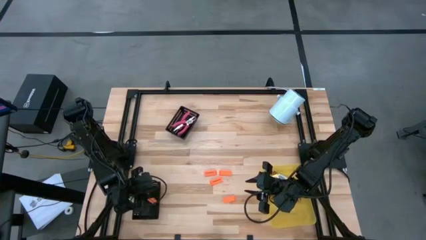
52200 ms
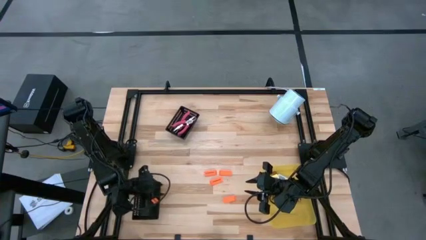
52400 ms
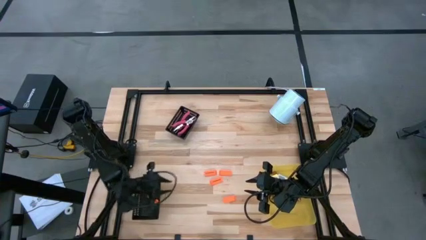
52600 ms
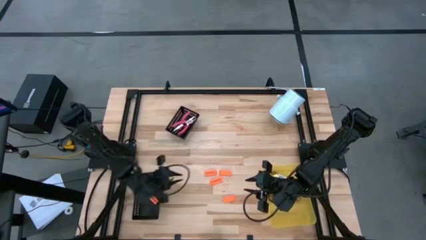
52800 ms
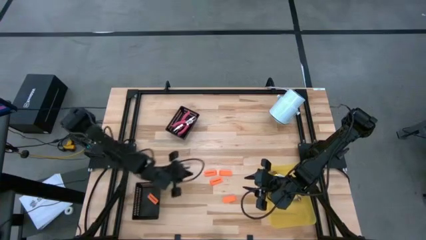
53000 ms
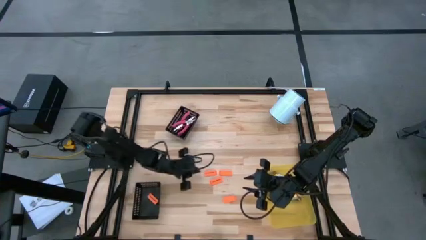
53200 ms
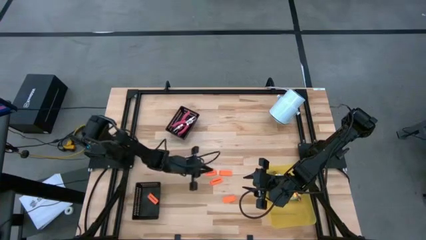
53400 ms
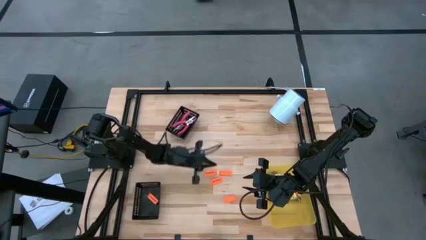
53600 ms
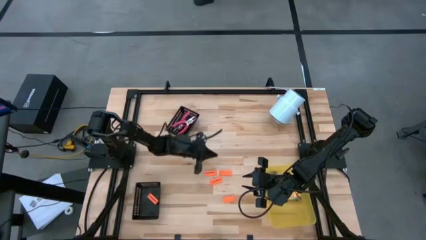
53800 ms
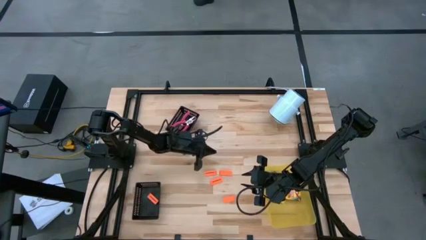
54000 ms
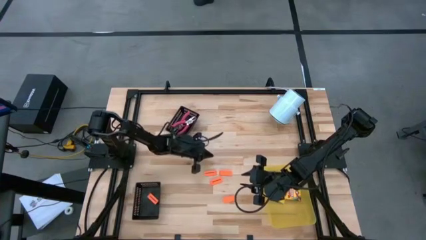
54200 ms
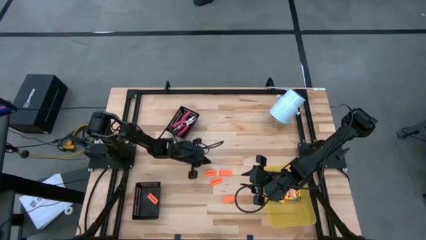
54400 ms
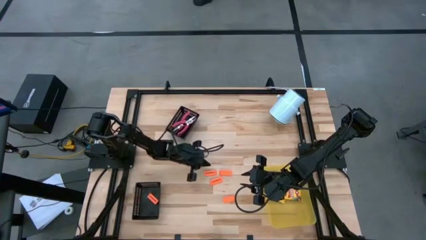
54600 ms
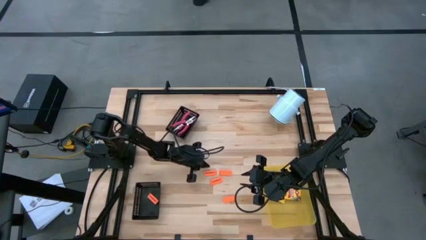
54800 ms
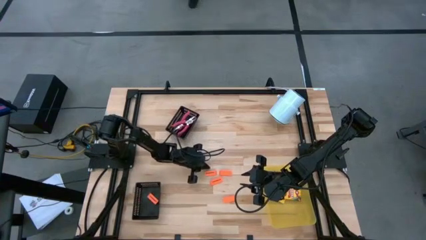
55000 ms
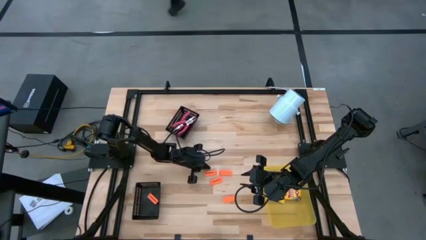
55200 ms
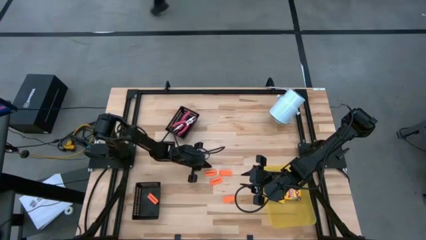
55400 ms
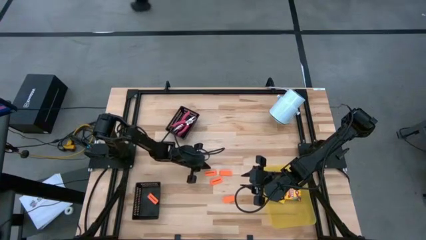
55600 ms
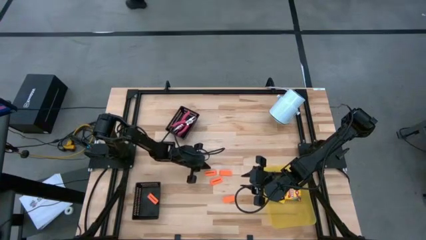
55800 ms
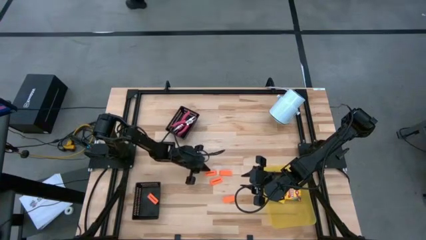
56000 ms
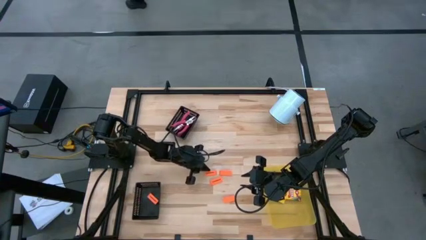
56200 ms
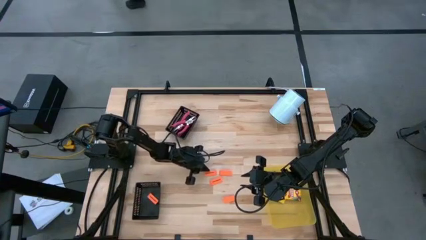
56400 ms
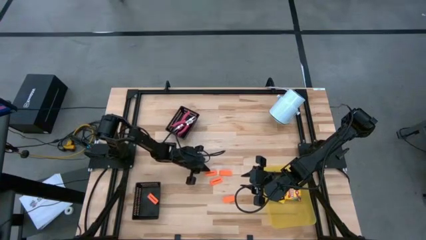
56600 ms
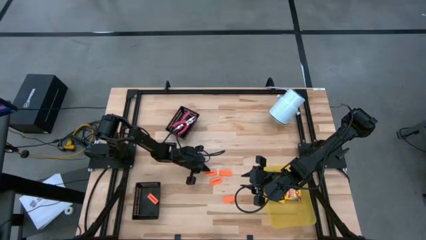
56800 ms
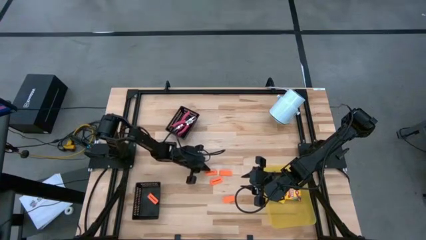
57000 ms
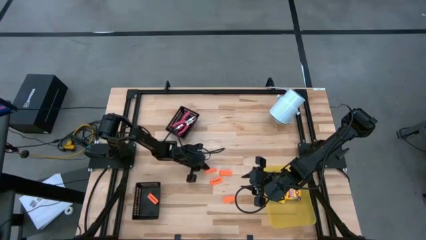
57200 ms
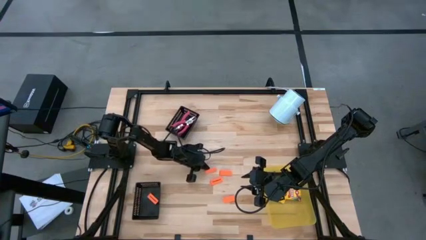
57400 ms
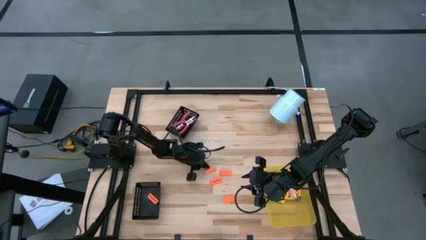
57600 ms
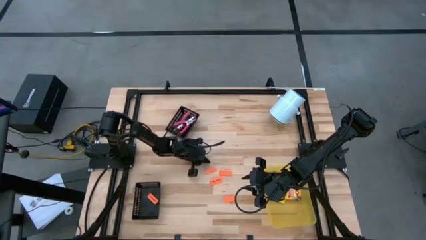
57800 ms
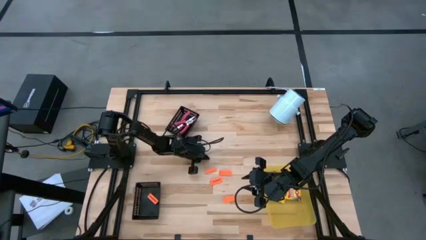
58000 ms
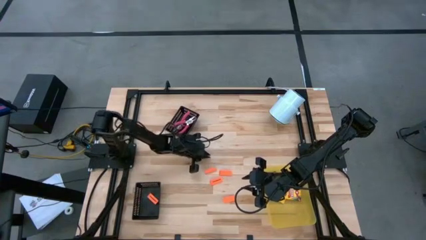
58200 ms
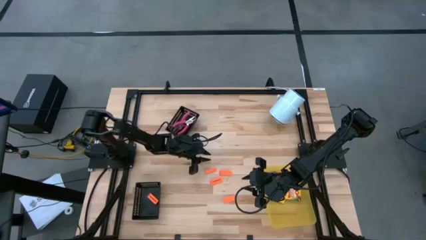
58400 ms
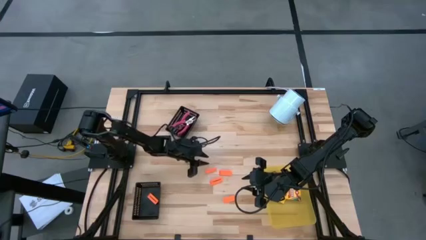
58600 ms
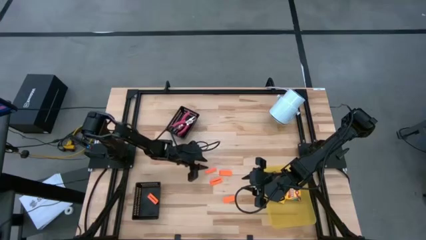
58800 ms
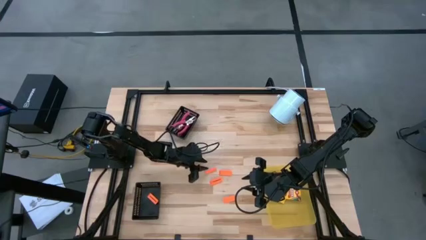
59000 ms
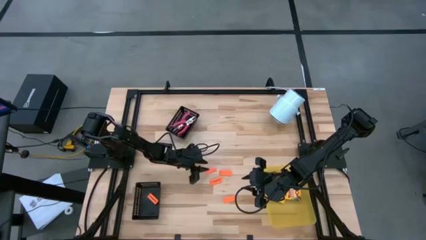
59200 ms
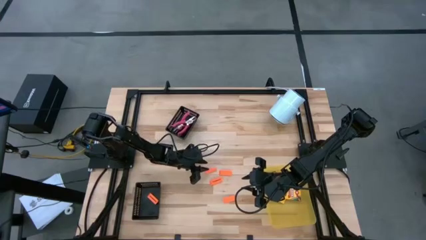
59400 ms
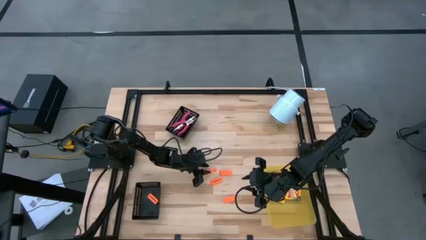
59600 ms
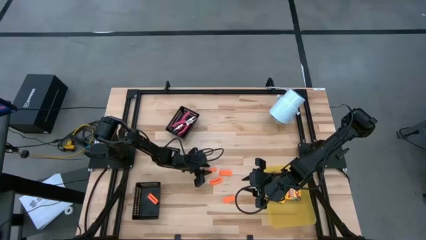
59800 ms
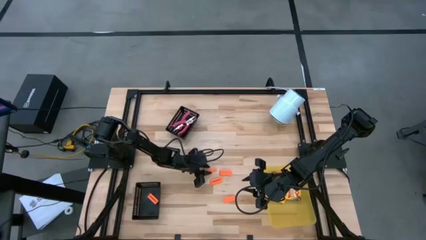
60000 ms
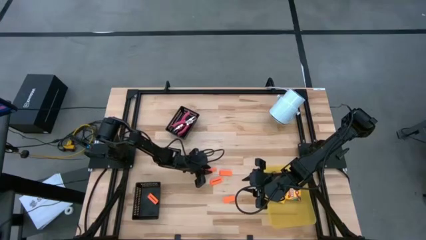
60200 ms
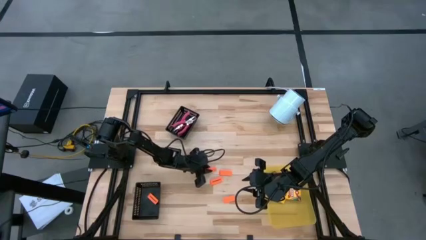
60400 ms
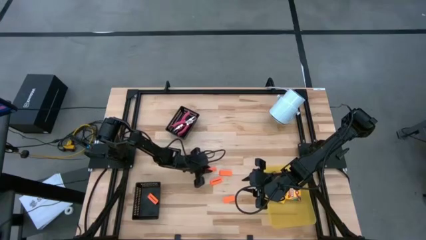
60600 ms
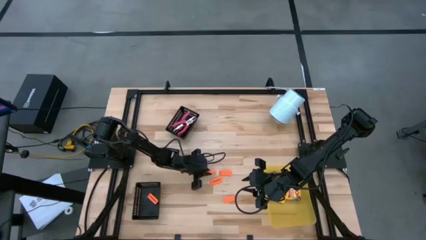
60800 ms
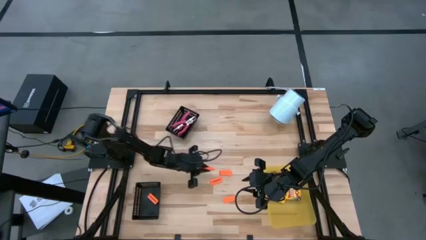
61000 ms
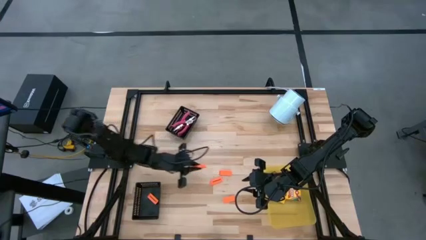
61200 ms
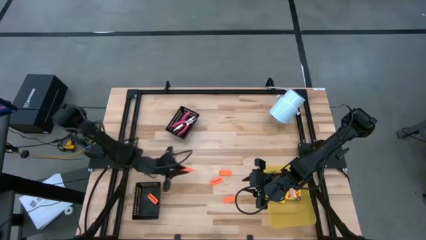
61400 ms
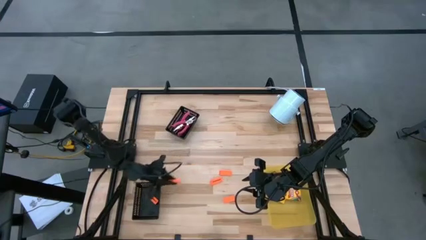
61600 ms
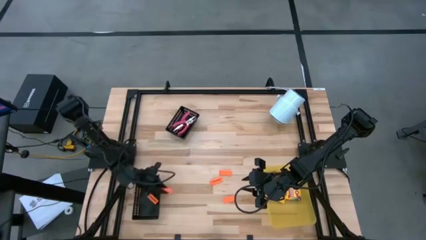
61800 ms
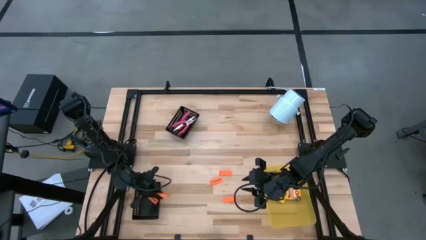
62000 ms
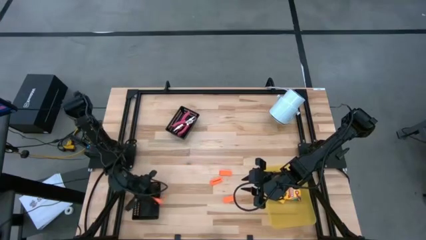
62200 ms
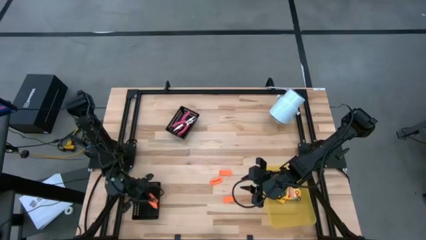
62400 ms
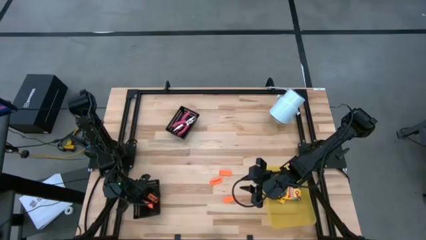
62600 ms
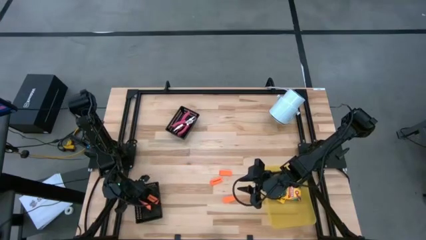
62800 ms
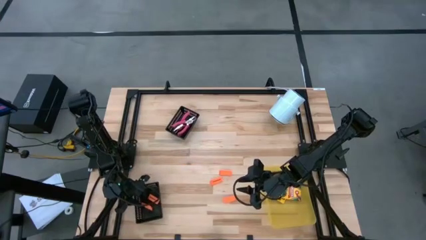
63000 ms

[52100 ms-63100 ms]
Task: Pick & Place School Supplies
Put the orange eraser into the bottom black basket

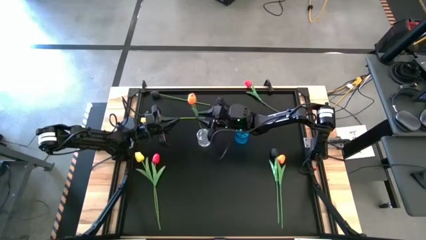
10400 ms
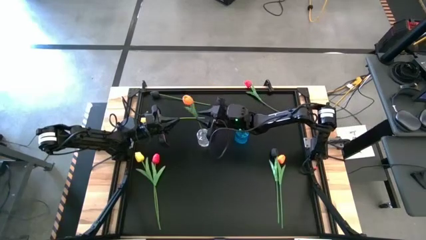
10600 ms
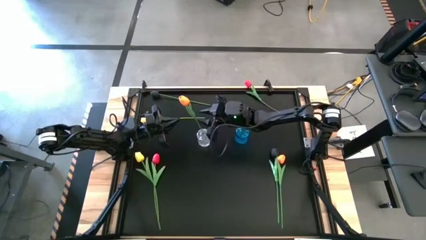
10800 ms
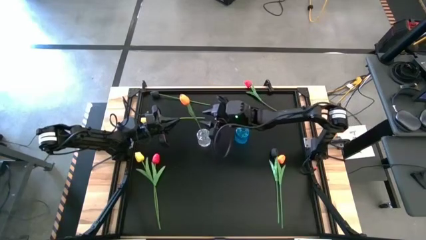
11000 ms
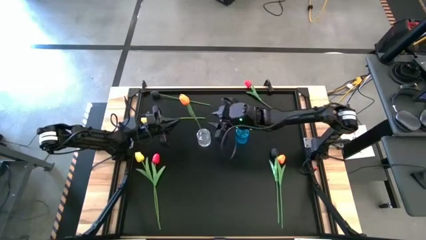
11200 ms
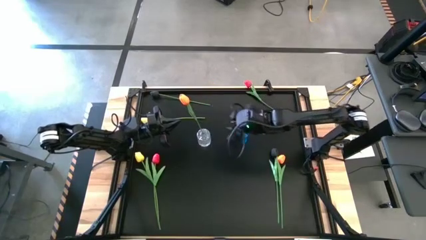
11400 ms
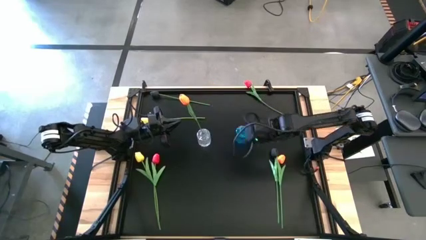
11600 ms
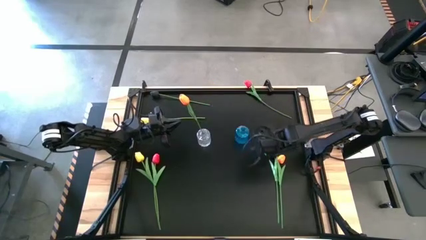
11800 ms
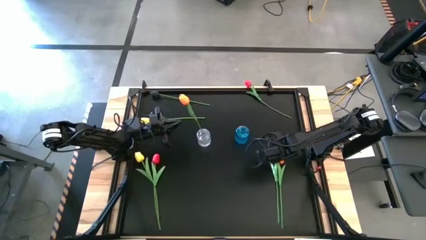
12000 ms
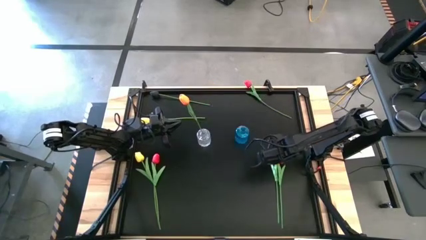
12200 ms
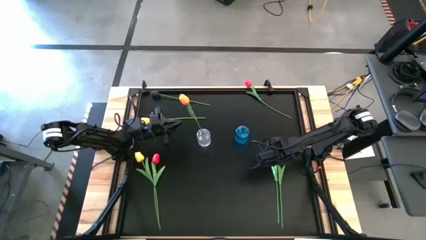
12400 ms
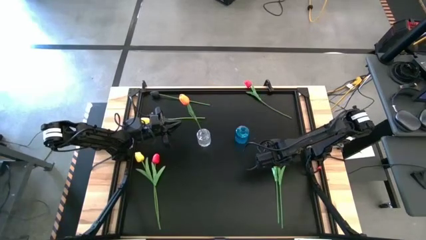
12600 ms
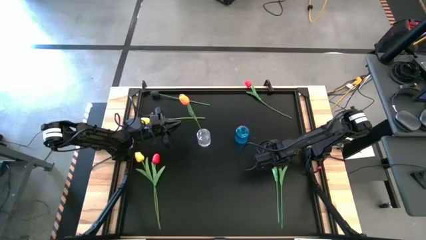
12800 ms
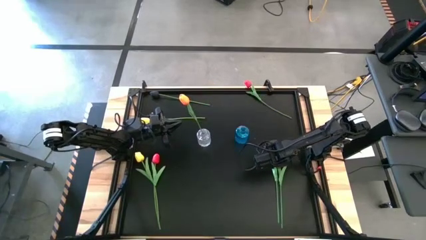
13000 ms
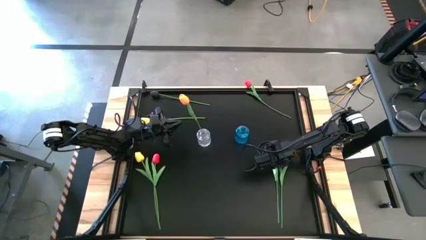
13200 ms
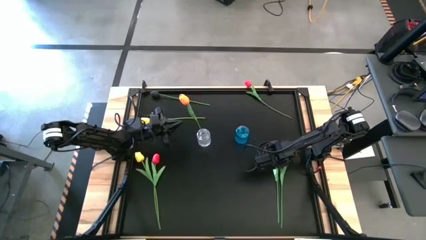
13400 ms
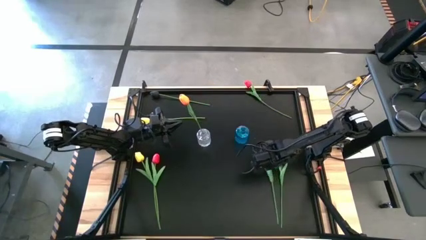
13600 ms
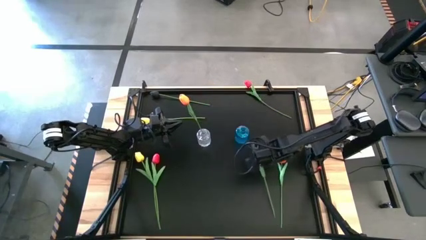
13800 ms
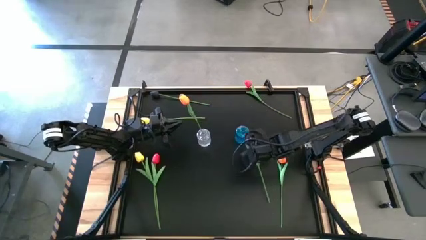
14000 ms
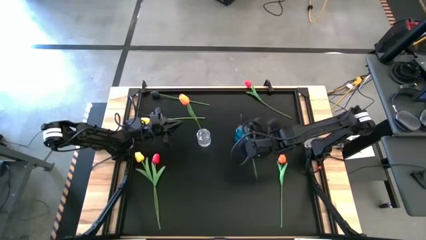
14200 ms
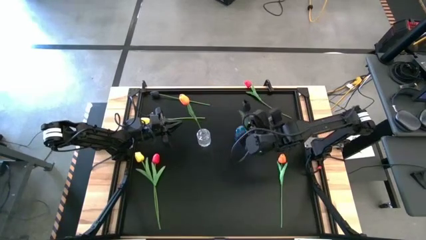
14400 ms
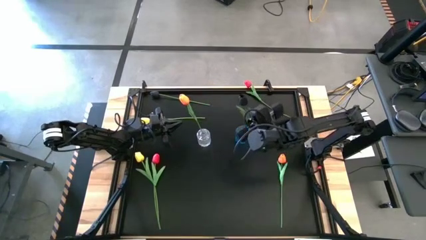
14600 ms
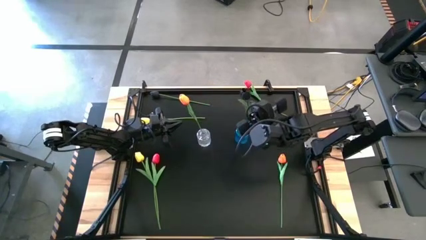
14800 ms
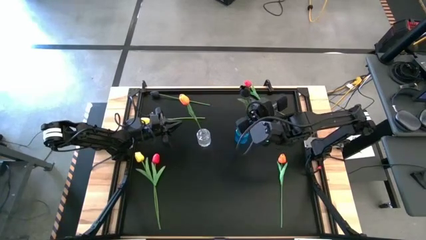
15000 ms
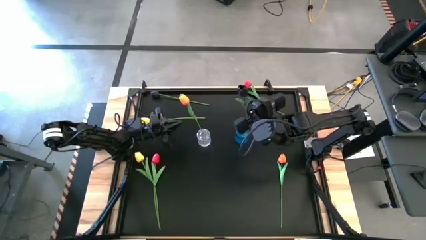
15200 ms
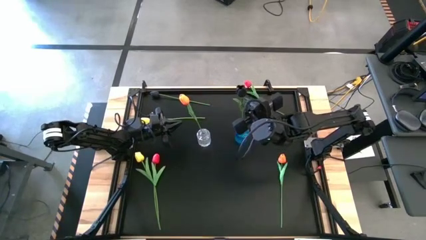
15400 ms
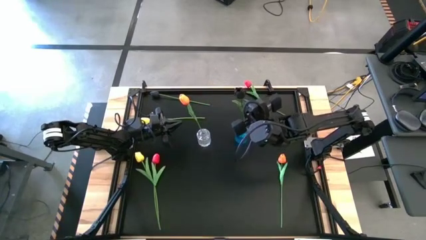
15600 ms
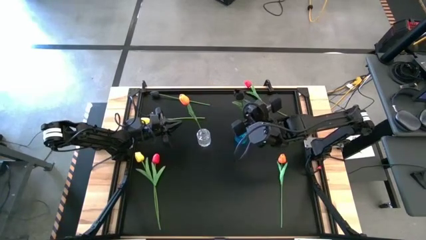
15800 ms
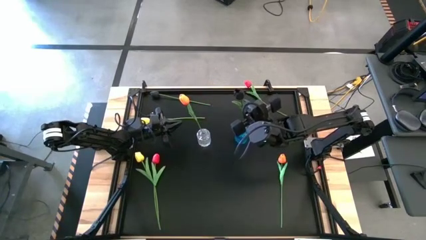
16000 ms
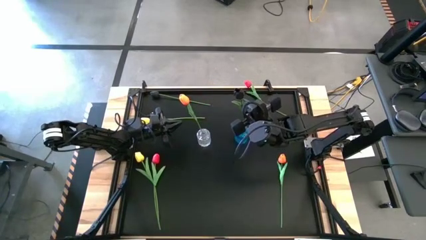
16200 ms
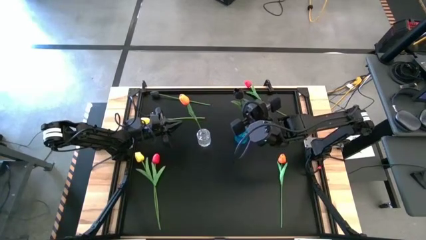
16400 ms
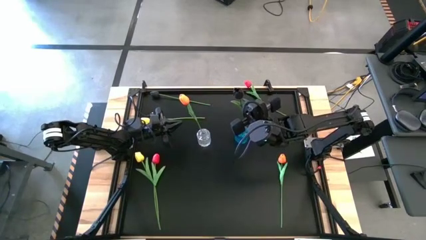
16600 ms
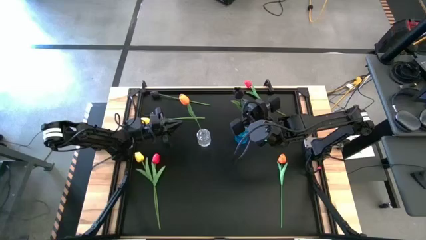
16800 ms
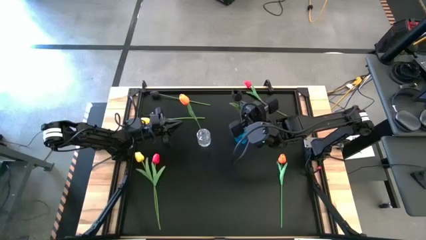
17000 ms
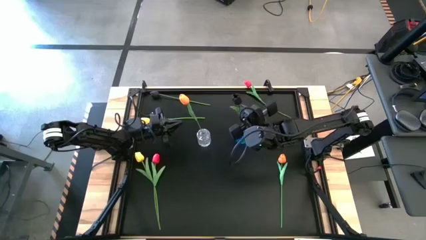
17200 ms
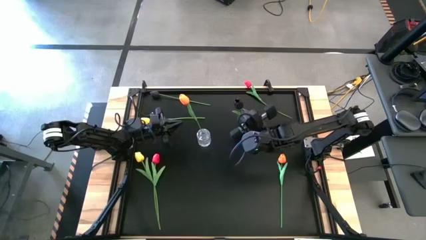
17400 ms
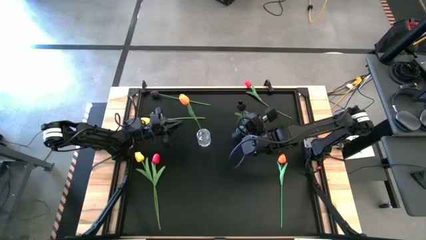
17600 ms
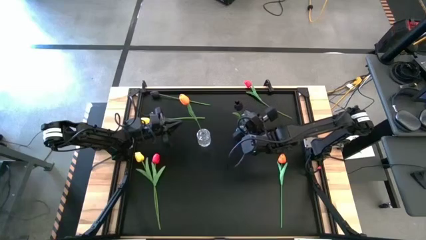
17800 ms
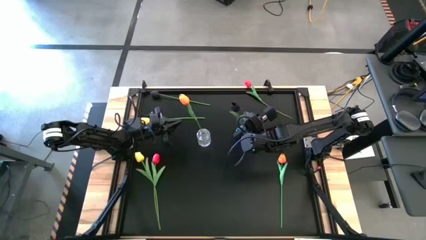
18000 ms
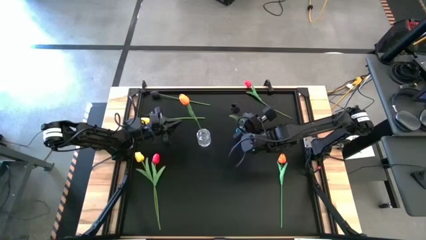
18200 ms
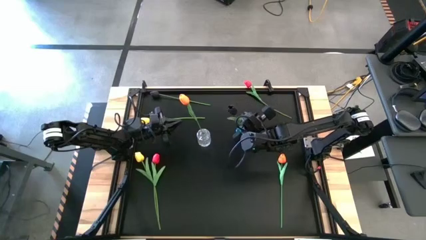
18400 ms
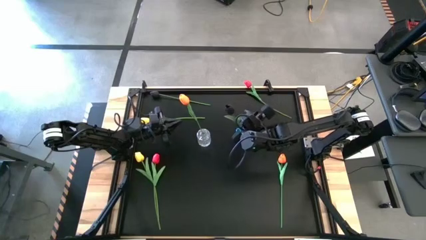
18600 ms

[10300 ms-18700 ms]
Task: Sort flowers into vase by color
Put the bottom black flower into the blue vase
